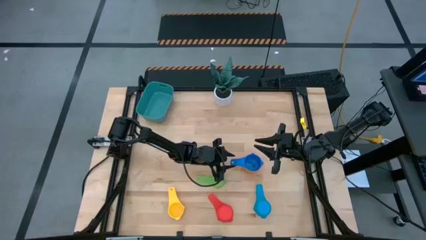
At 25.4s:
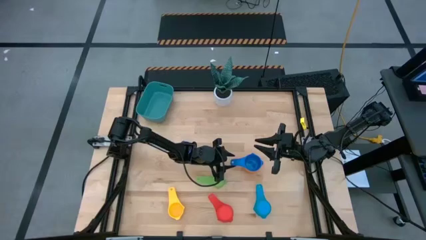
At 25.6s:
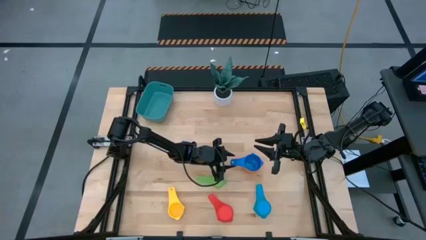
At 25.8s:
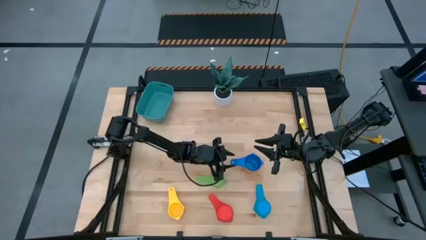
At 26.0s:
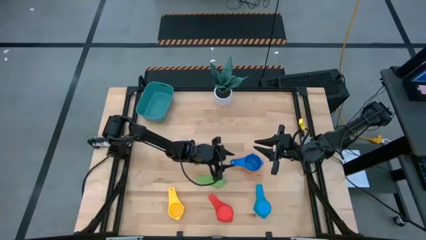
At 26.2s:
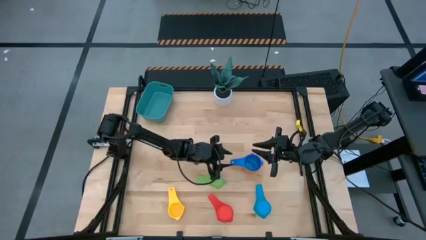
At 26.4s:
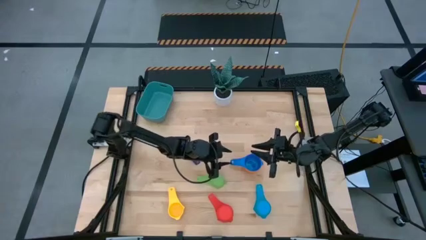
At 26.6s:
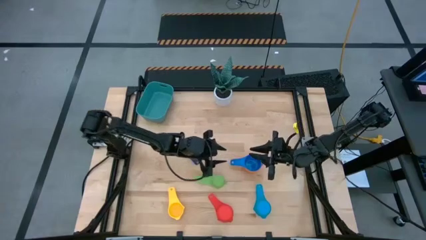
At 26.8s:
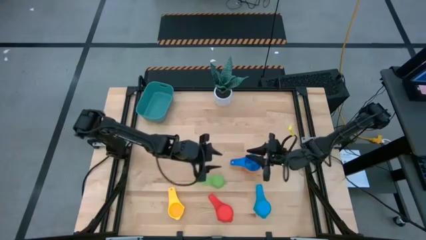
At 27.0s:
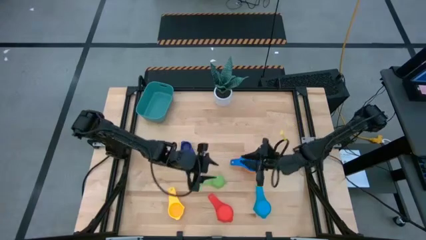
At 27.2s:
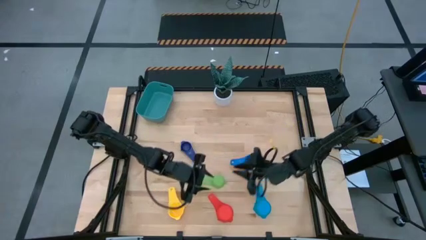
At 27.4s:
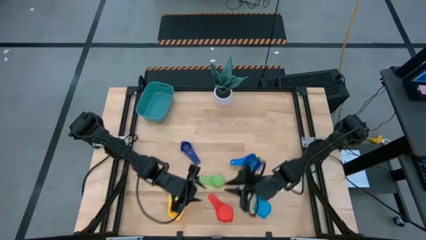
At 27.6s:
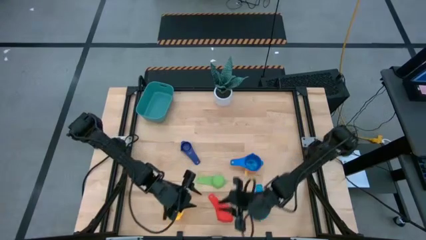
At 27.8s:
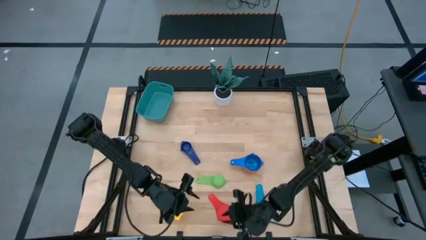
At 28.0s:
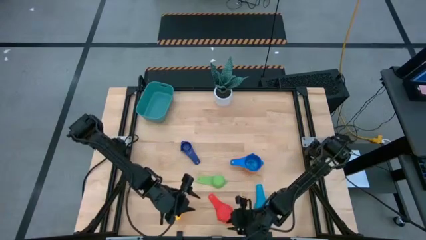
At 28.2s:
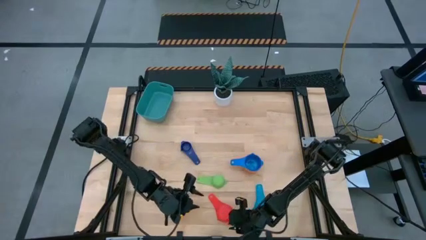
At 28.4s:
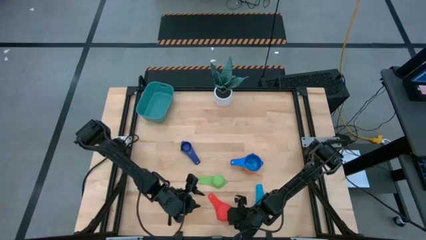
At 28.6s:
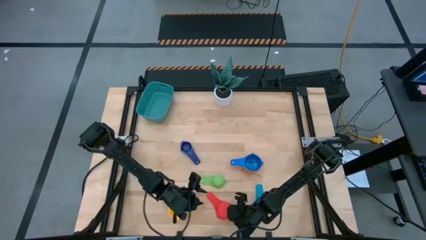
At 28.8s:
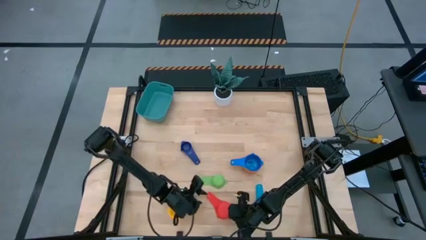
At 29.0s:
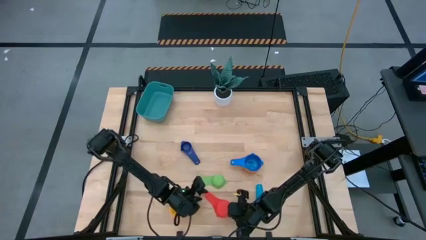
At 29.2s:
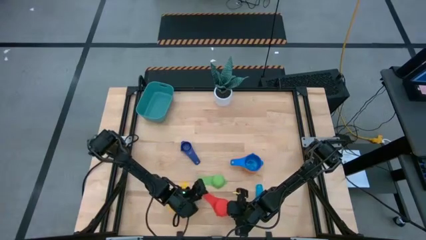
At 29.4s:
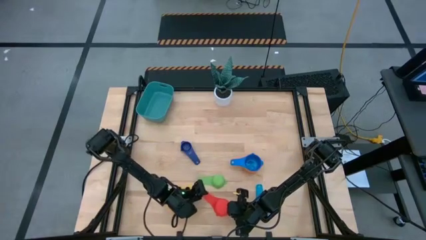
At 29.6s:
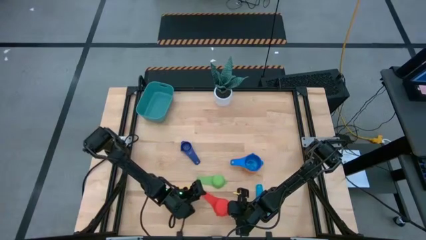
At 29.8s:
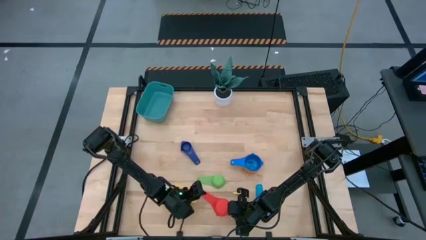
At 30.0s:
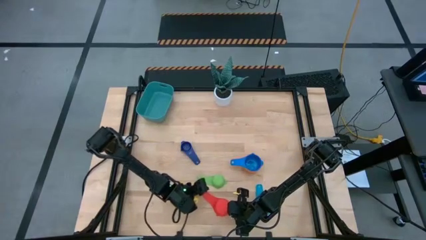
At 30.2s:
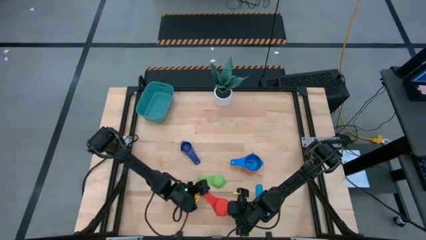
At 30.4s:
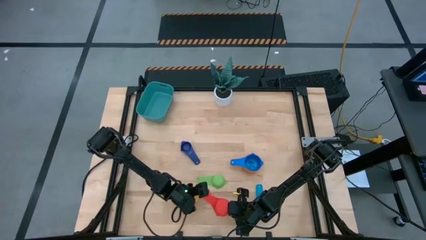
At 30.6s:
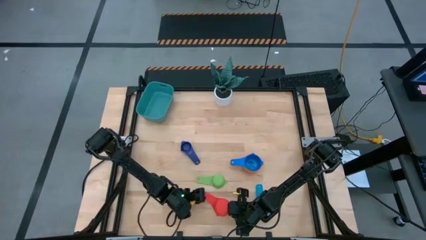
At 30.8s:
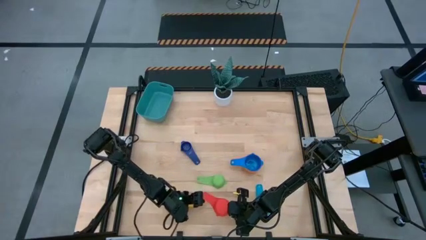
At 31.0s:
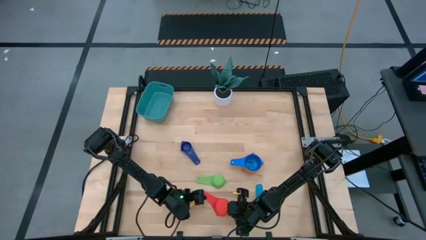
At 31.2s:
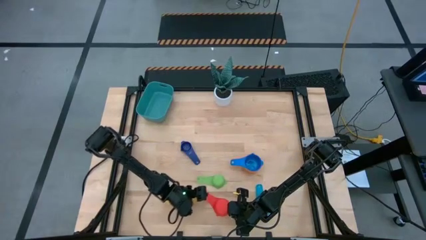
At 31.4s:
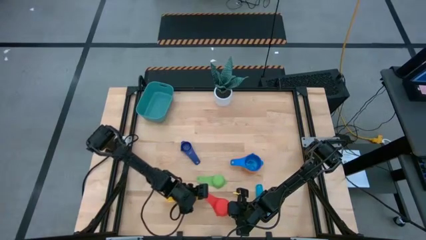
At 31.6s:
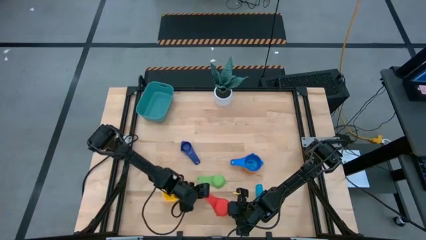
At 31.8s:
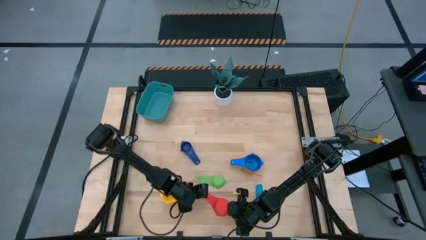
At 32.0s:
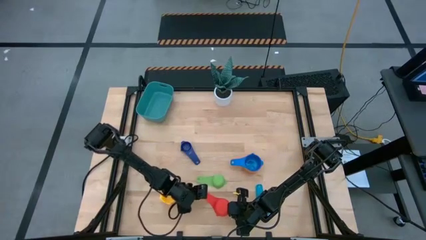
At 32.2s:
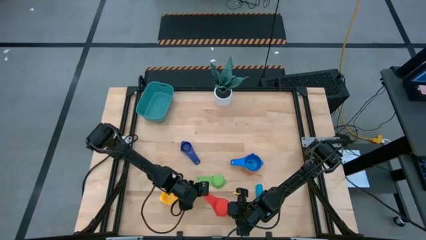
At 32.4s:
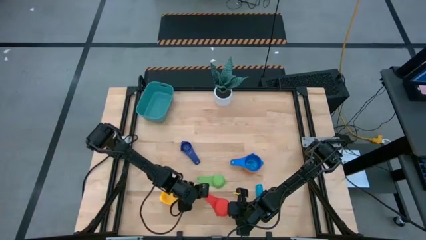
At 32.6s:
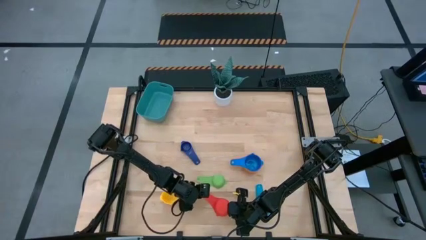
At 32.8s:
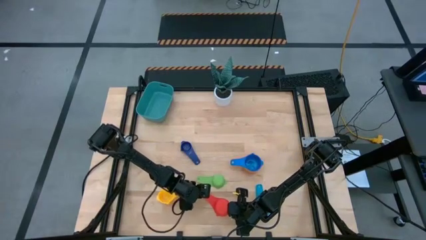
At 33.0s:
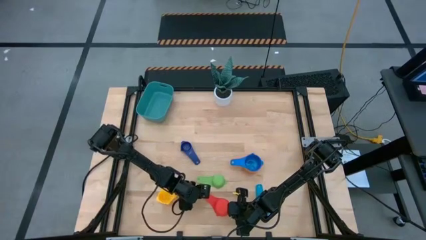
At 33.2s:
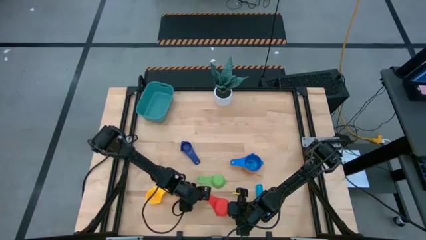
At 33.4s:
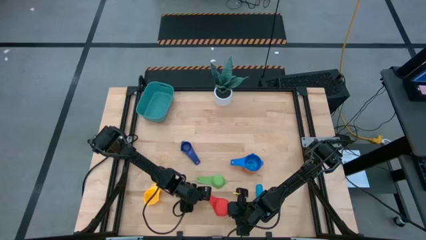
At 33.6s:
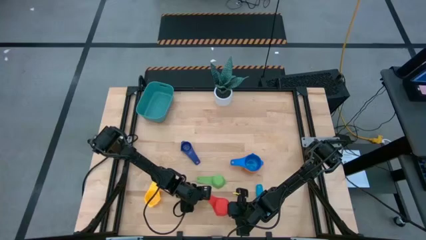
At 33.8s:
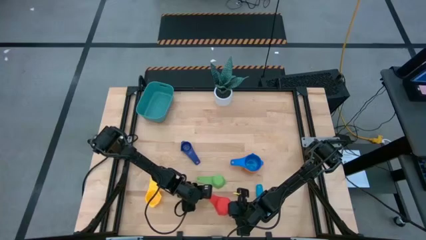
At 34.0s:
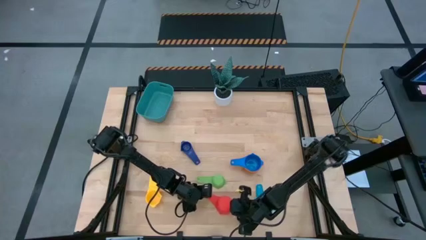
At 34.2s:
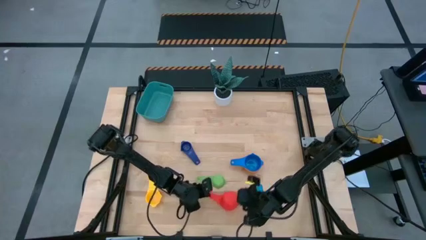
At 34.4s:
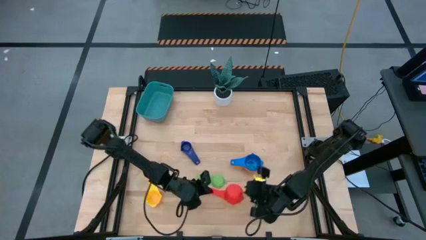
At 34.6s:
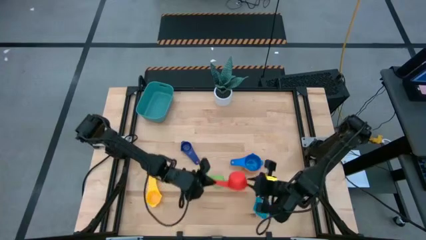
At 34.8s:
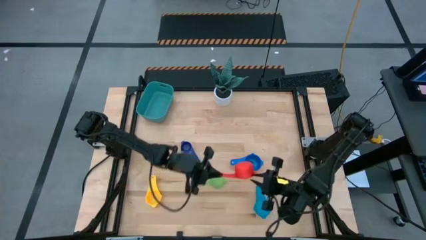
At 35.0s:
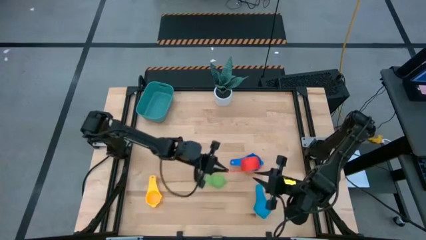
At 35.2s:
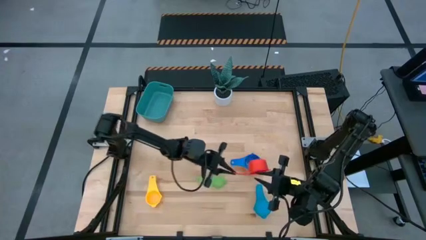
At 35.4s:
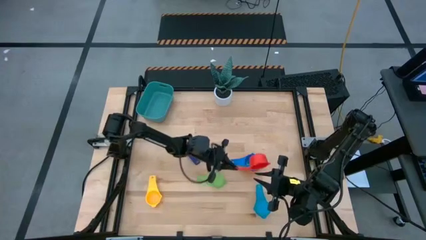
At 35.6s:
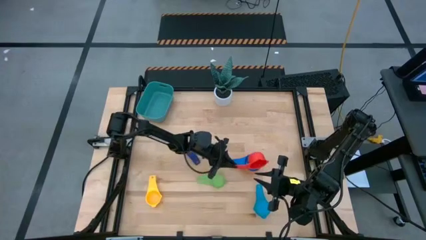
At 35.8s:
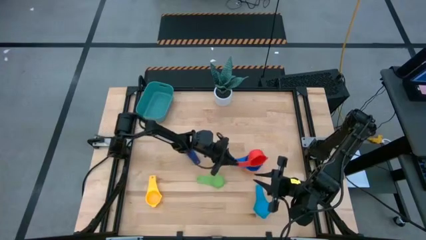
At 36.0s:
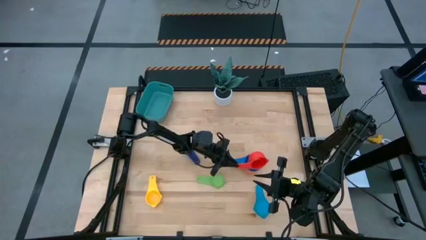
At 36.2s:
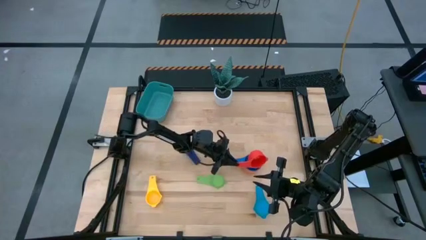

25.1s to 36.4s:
Task: Nest measuring cups in basket
Stack the red measuring cup on top of the blue measuring cup

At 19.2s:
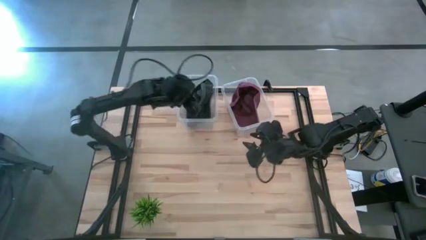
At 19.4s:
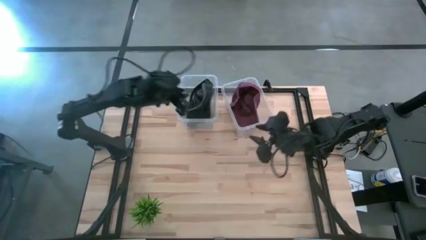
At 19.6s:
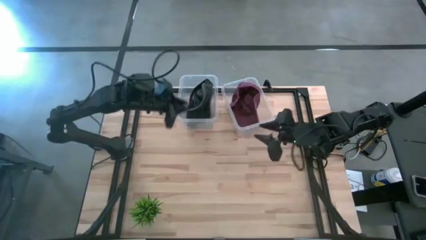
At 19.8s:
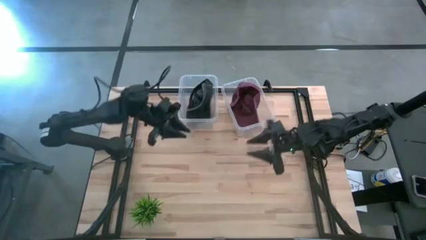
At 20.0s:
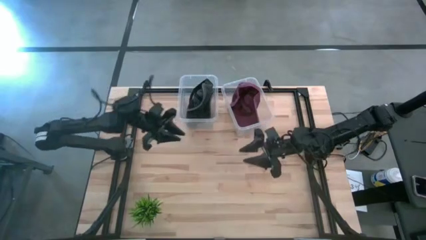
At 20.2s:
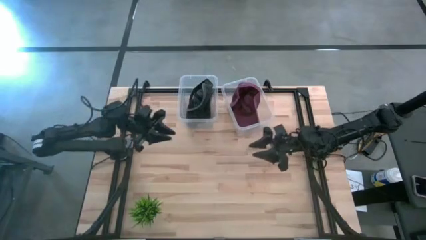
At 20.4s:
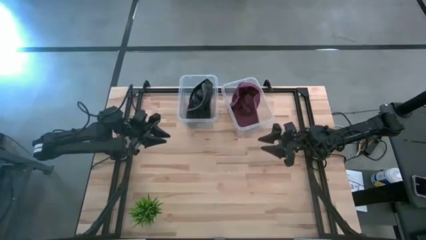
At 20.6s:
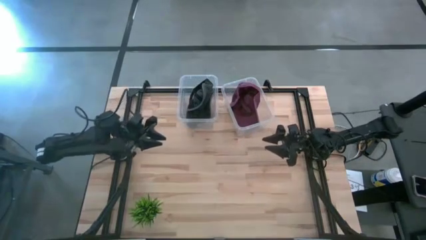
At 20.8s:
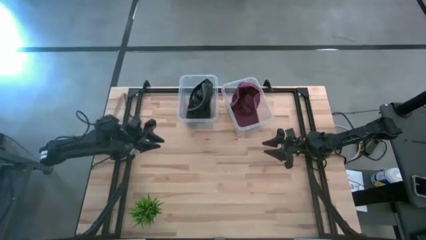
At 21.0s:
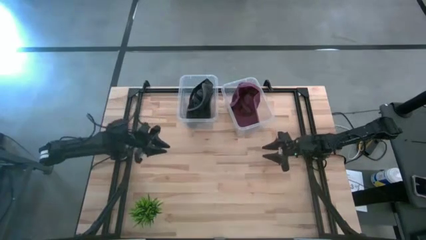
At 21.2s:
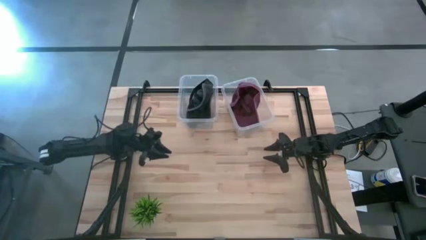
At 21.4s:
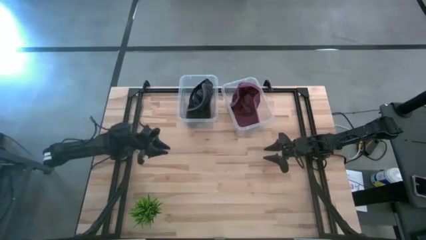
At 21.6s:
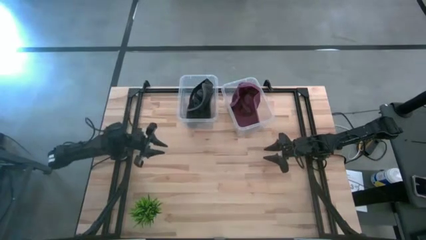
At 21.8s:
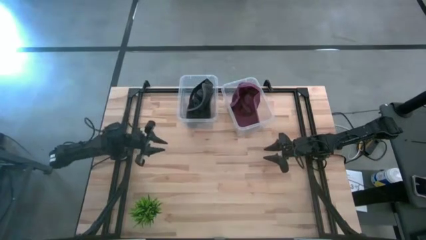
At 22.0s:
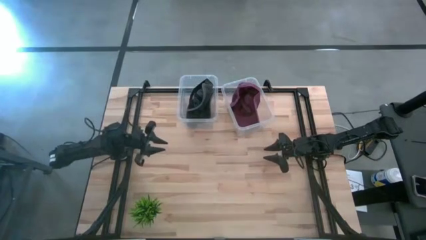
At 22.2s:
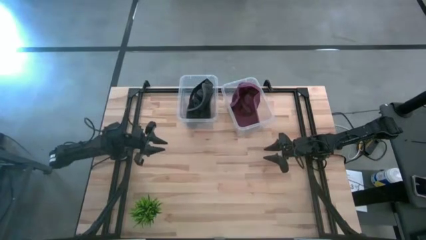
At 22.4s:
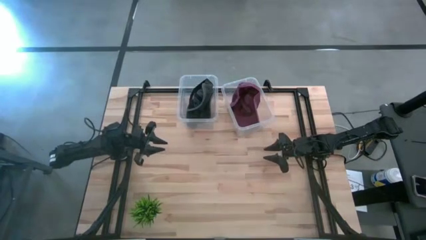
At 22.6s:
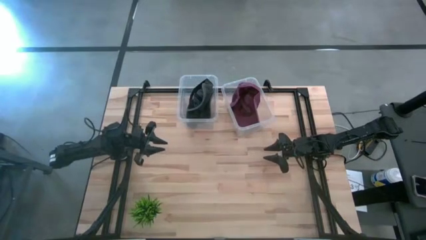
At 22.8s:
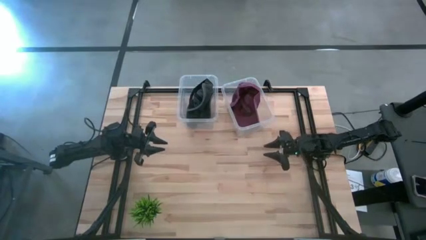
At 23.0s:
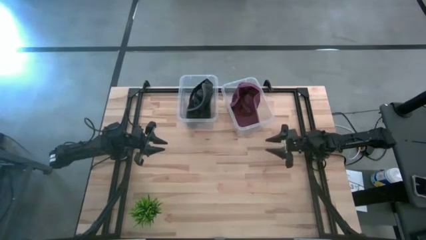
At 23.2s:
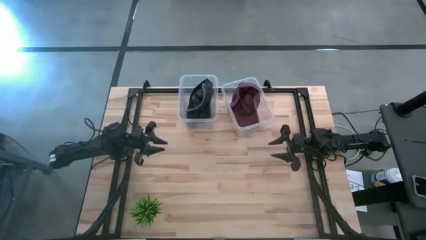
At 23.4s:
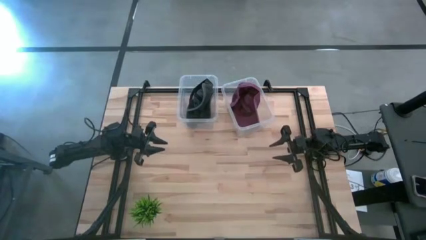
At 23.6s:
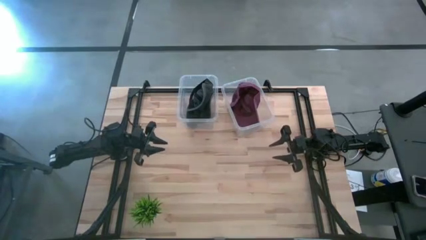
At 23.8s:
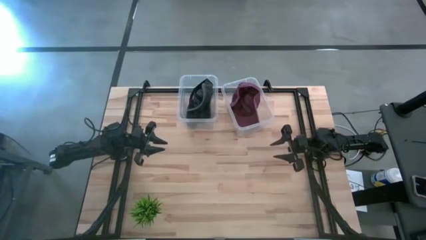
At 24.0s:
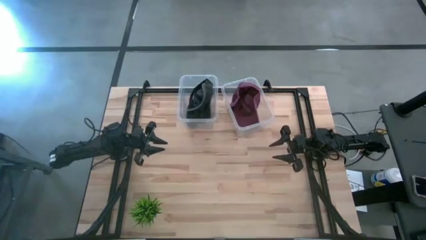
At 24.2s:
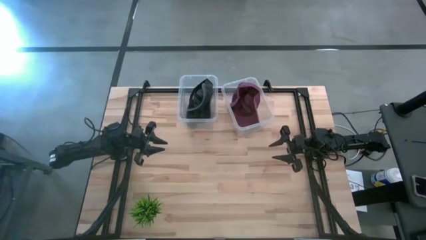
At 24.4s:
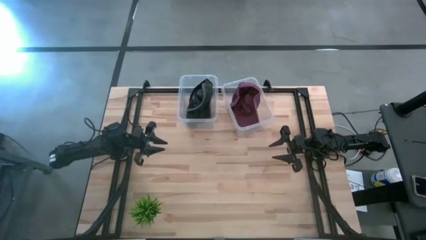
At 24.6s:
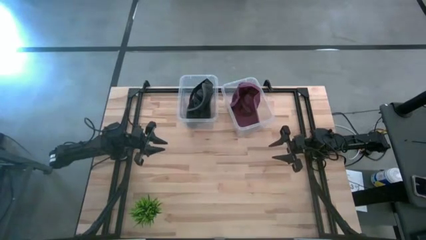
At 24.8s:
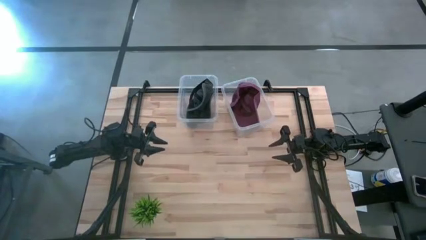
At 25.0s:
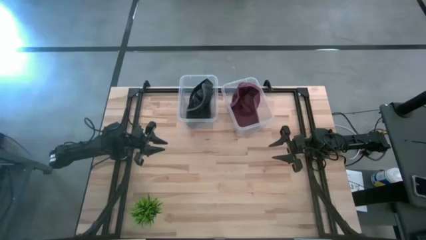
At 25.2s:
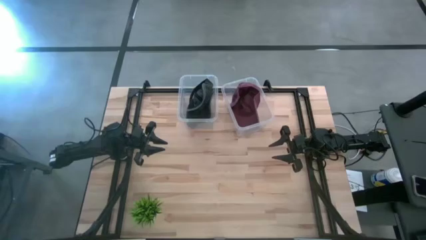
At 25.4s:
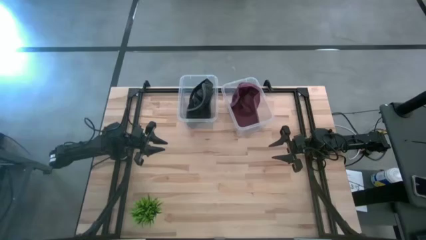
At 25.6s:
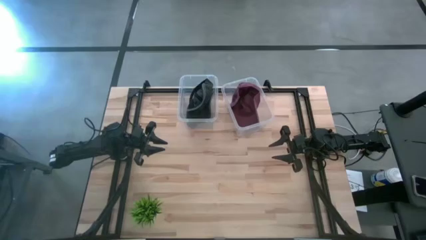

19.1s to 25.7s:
Task: Pick & Place hat
Return to Home Position
